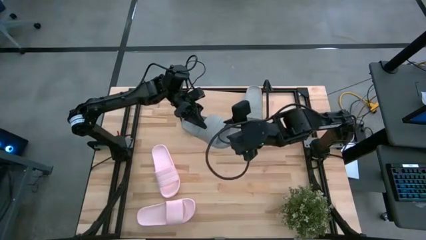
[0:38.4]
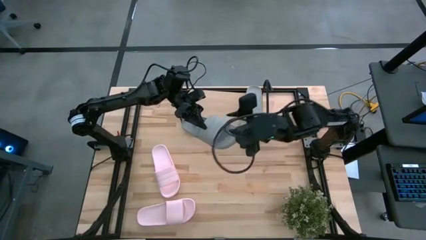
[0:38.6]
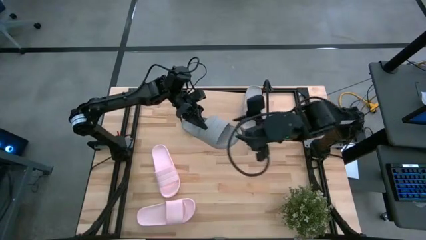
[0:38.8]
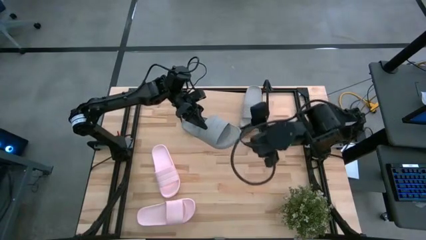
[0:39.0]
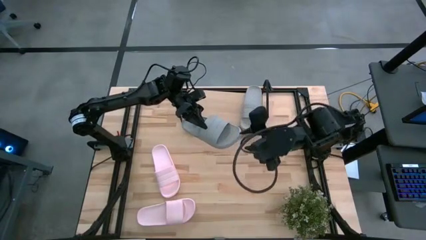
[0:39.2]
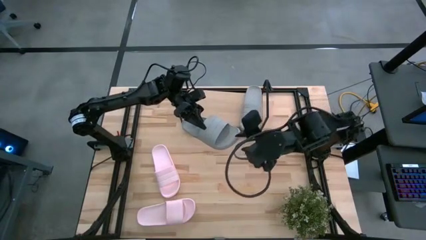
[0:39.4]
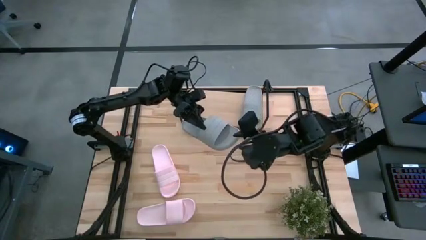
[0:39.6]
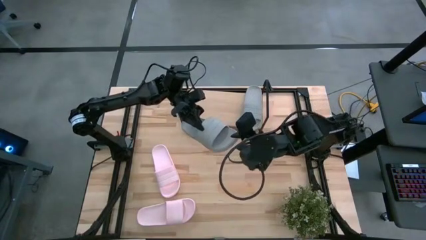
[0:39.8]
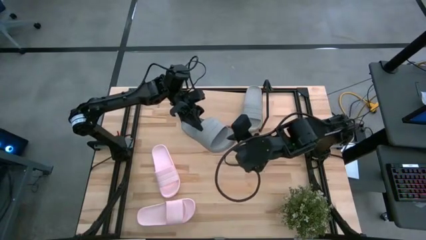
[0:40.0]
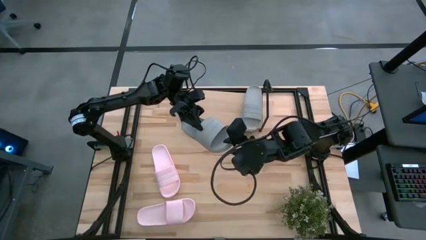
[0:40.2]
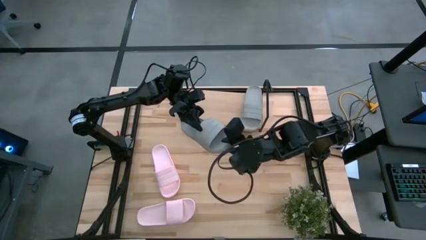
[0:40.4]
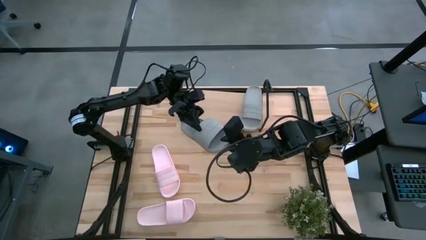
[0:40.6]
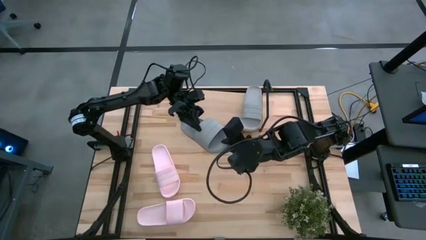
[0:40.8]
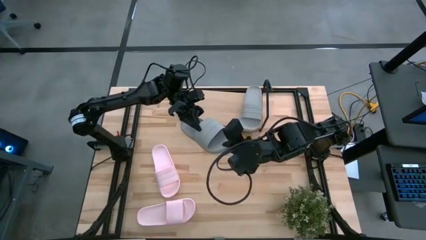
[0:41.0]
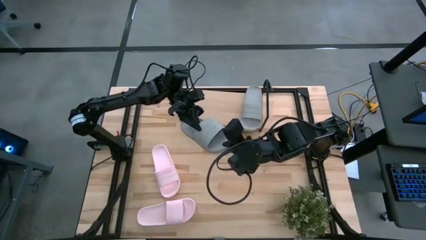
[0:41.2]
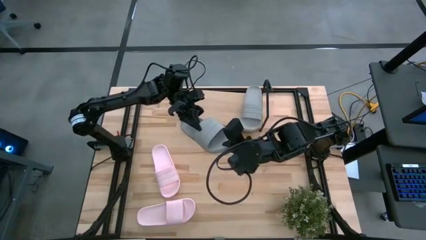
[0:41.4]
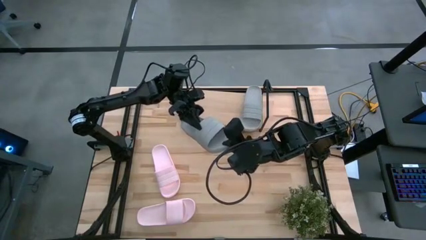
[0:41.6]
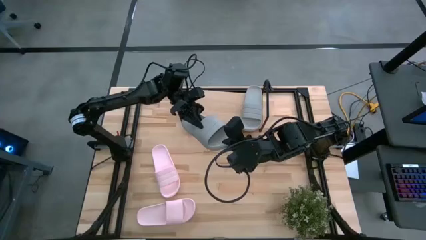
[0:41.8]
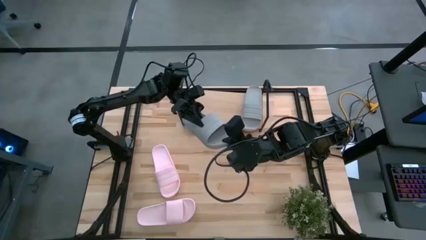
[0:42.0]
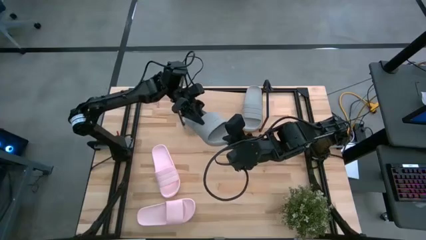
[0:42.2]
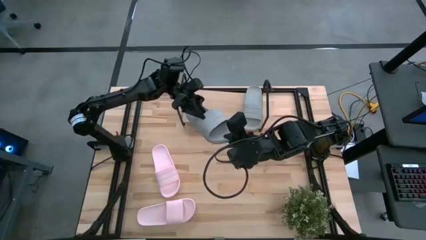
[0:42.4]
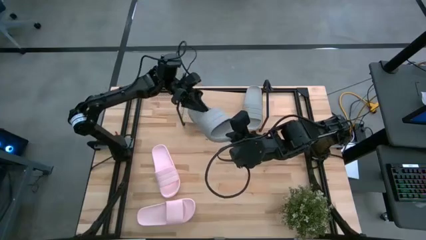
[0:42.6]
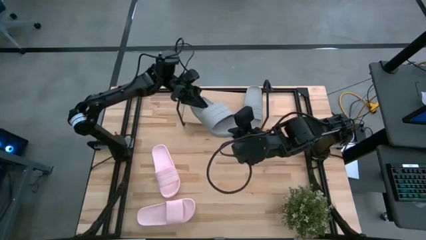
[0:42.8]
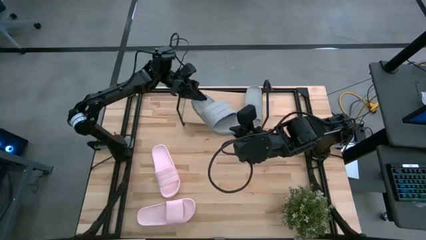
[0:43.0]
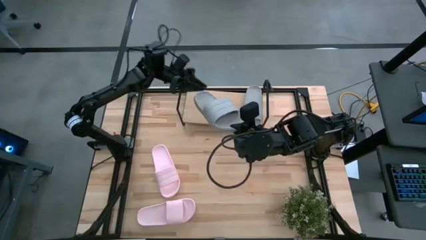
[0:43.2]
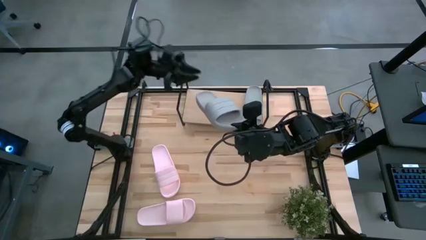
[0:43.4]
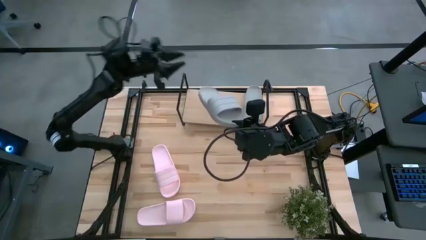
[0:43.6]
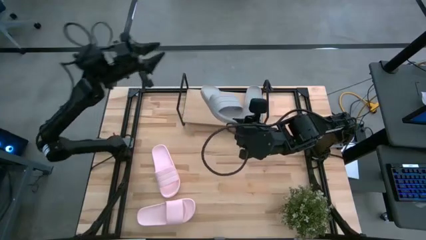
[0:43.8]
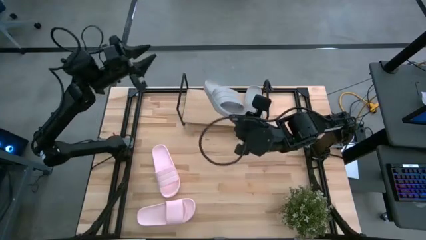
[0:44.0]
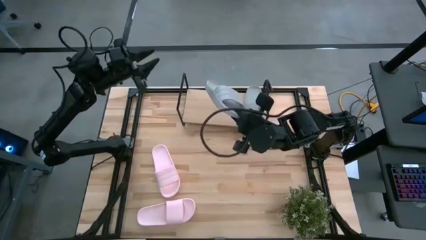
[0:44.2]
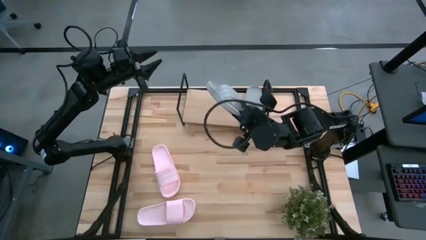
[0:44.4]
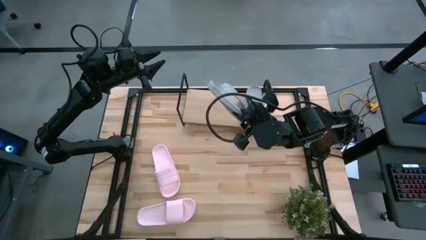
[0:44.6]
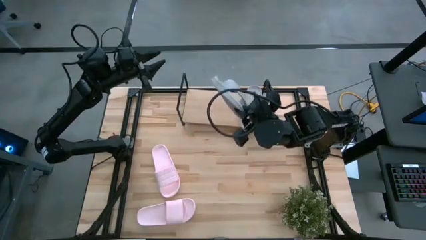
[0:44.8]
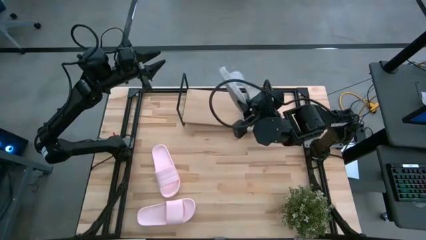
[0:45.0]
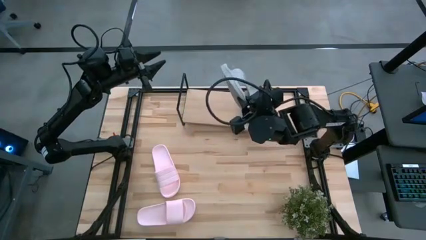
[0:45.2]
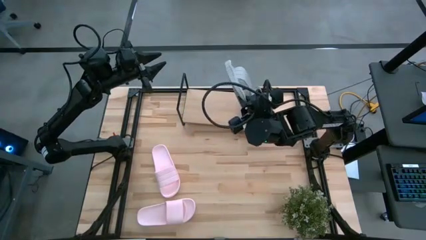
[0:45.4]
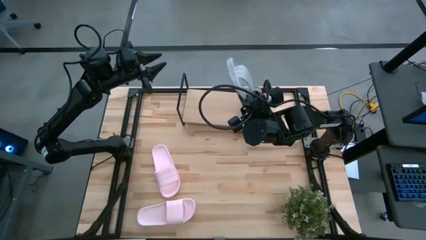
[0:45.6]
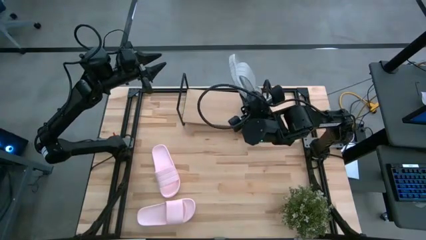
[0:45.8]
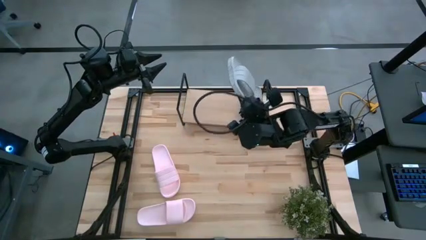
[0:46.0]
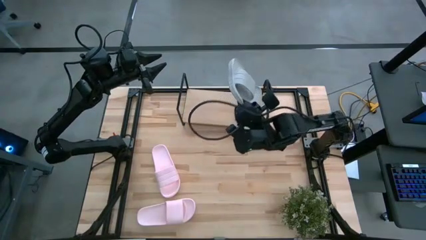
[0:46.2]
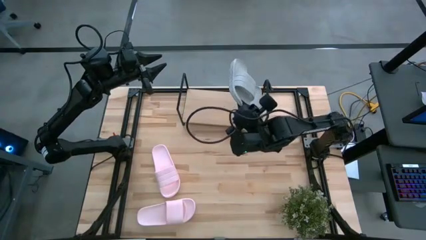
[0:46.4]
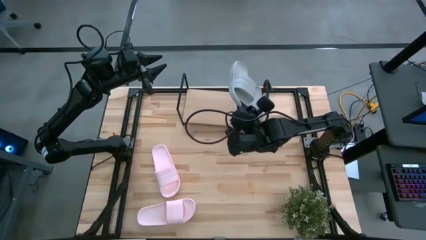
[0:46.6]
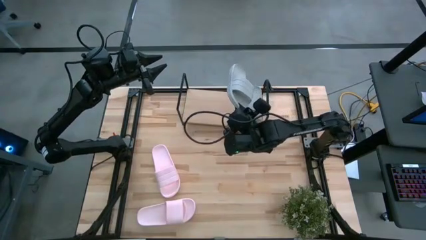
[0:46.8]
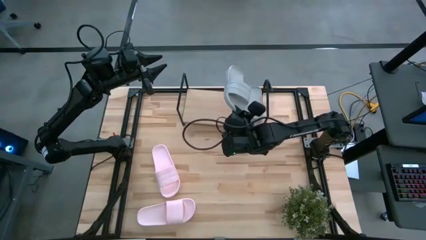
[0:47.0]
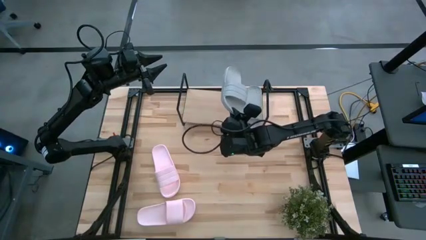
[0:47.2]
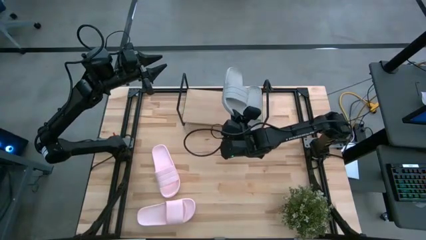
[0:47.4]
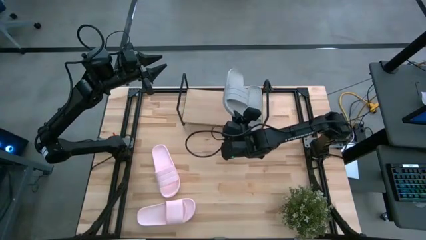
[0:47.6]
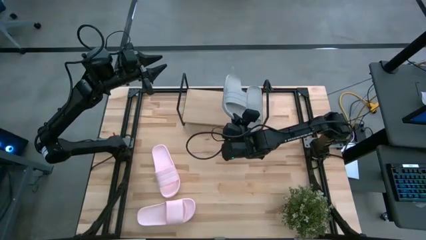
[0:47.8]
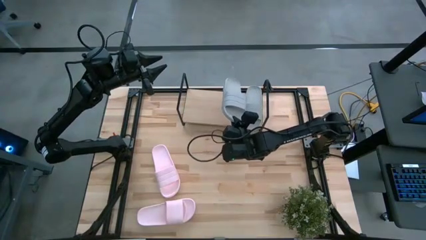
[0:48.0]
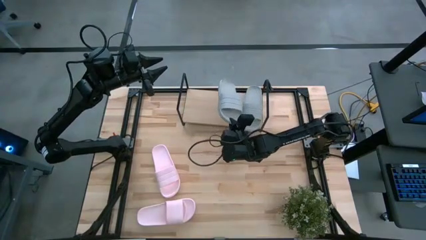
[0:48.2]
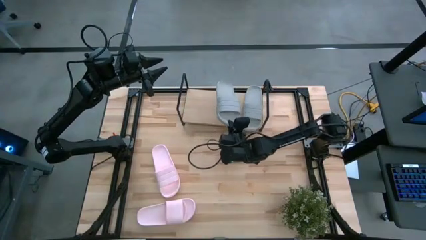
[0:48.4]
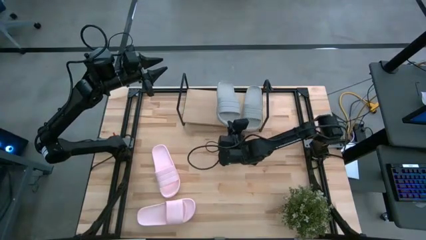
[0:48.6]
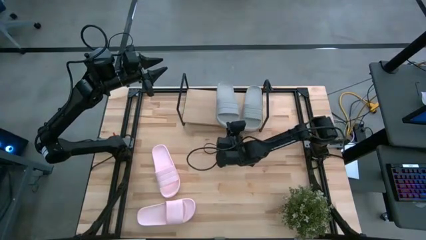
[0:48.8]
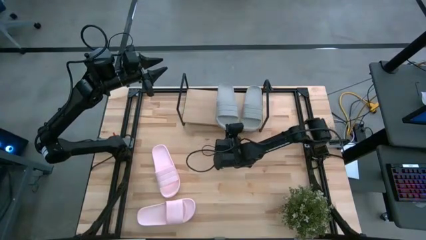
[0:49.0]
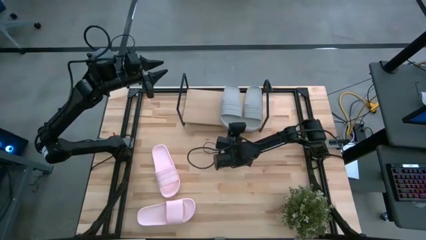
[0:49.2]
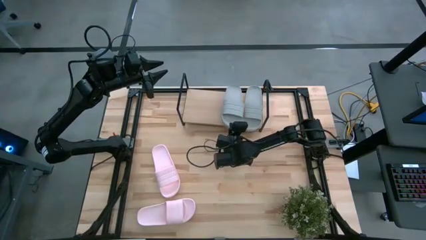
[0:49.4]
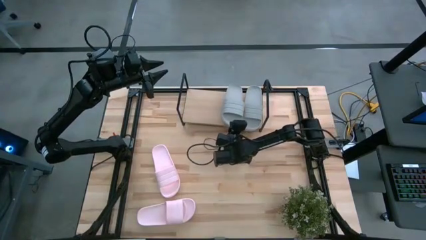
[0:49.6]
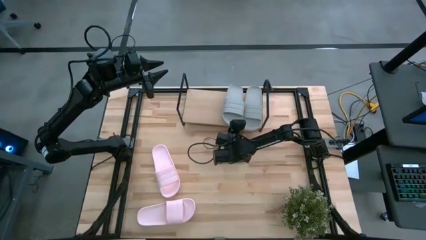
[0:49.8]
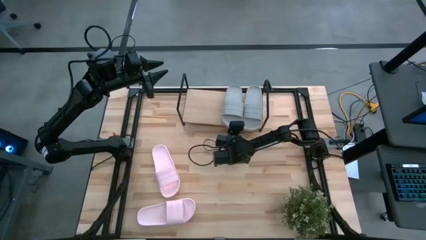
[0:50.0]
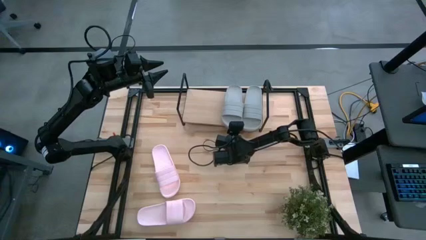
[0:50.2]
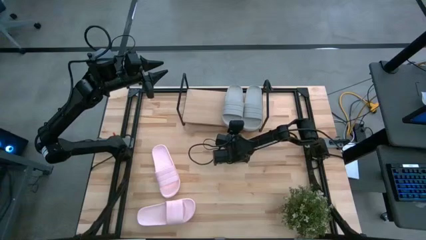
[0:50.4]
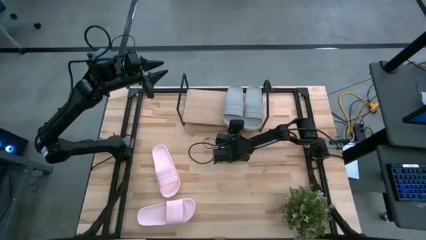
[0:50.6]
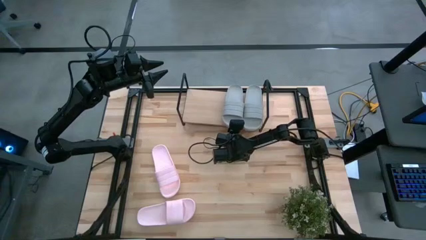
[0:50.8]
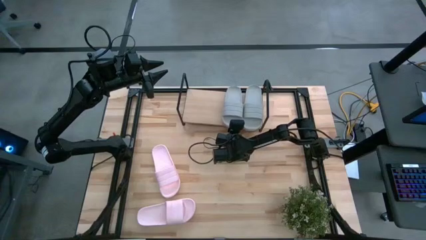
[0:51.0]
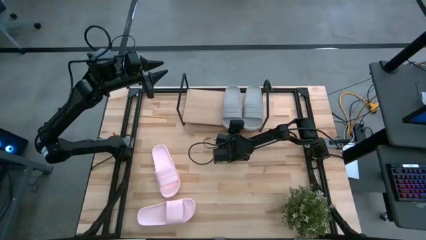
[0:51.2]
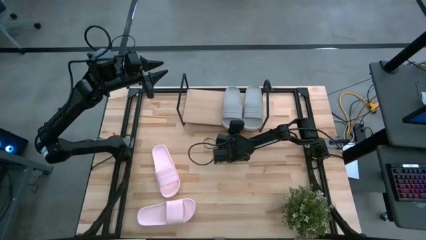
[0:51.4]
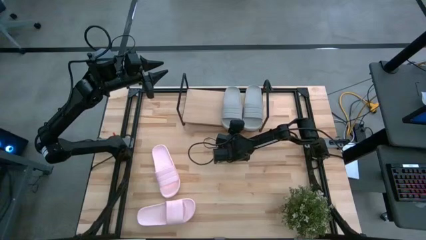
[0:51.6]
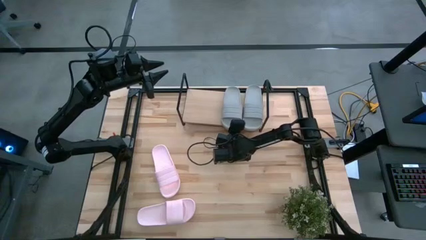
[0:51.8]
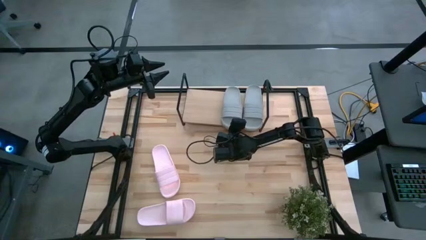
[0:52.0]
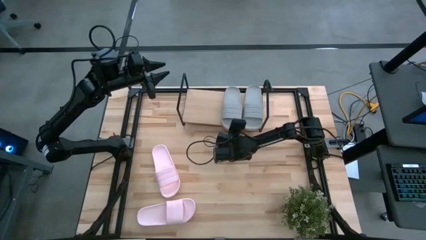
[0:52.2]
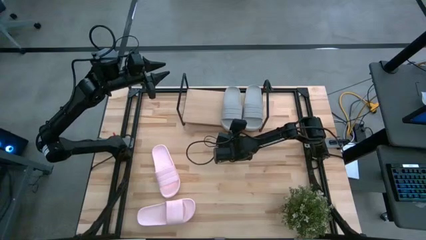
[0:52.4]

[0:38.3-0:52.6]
Task: Pick and place slides into the shelf
Put the gray slipper on the shelf

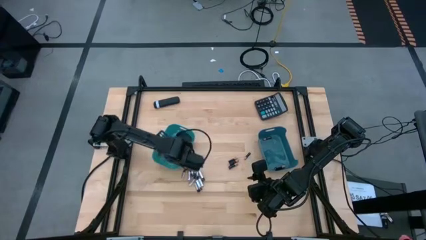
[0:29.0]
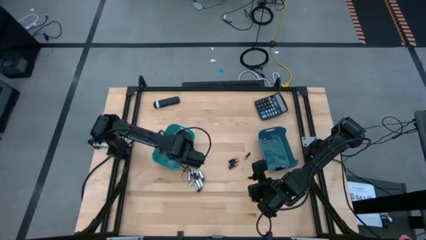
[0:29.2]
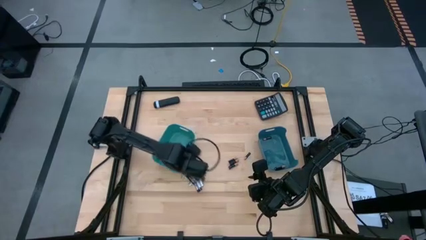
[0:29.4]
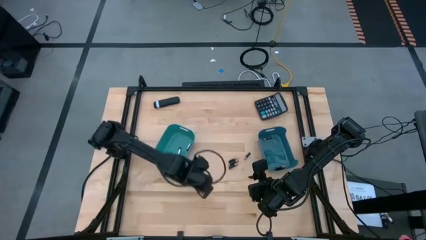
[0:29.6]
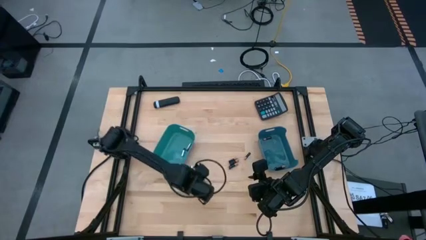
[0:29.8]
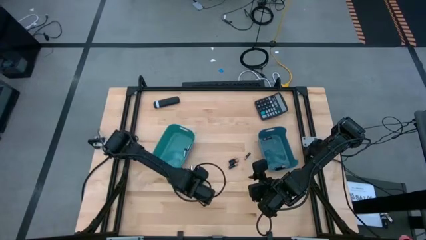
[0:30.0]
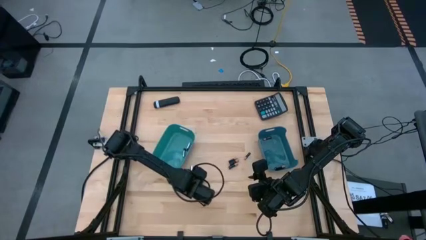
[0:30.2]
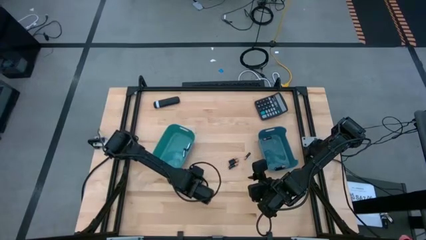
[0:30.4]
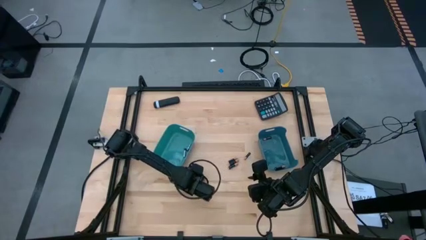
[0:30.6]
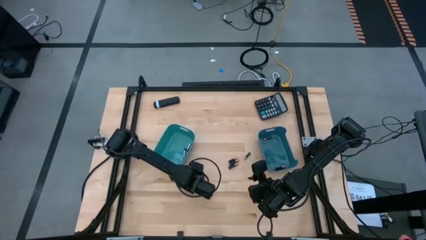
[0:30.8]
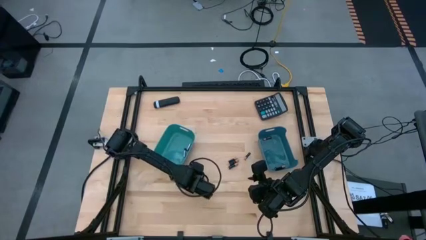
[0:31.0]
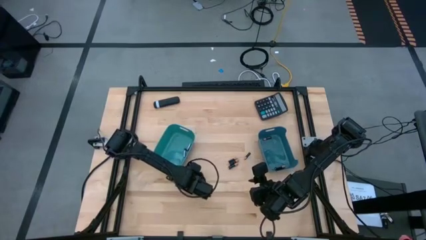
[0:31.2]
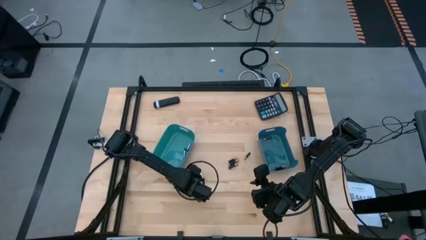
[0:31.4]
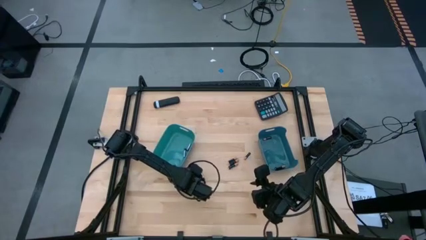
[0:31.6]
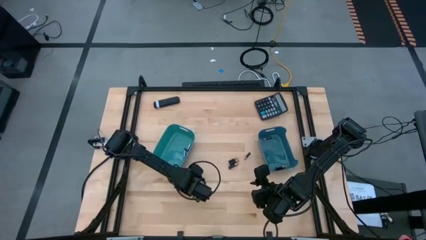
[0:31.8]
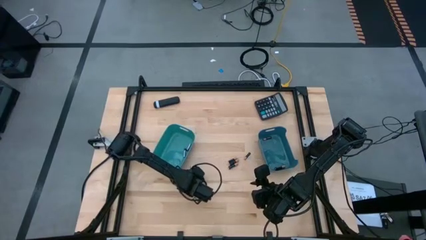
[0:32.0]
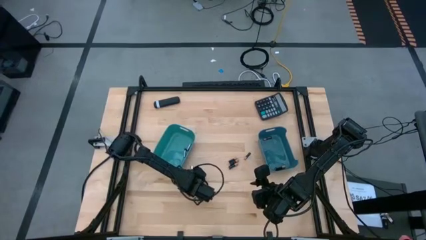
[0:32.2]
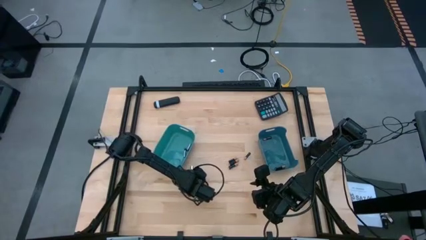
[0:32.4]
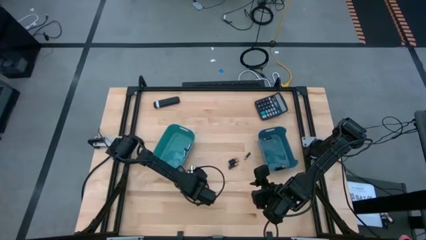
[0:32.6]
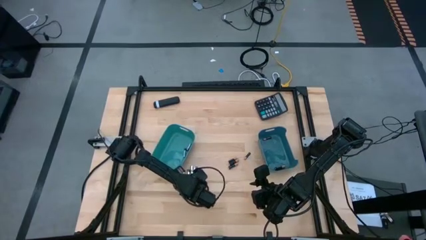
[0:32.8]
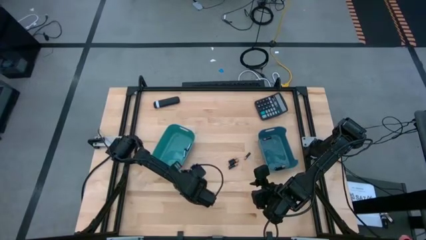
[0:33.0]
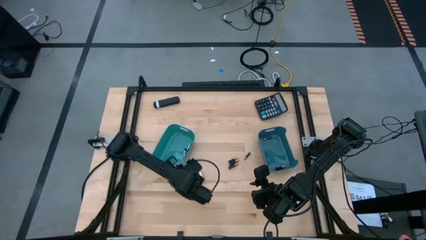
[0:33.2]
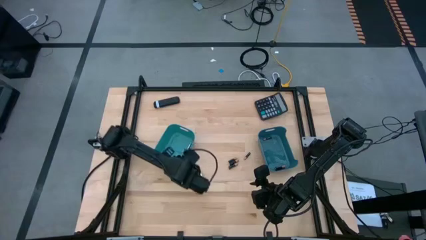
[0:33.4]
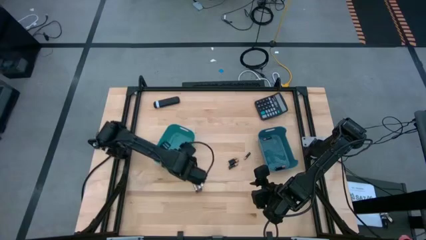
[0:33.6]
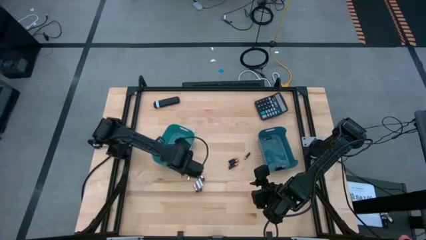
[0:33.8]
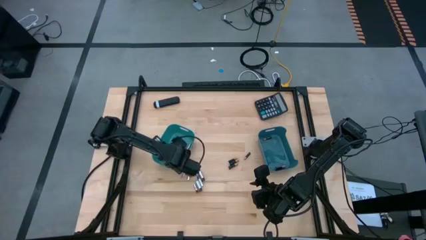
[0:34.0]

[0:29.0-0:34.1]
Task: Sort batteries
Put the white battery into the green bin
